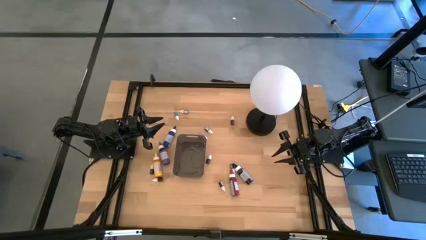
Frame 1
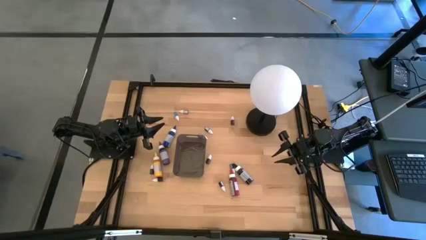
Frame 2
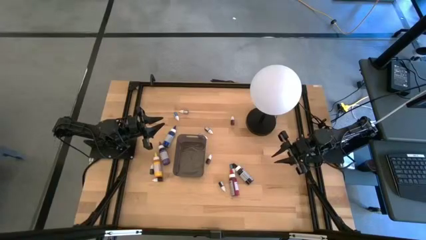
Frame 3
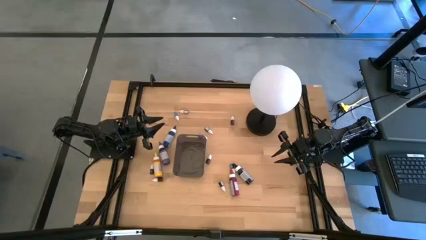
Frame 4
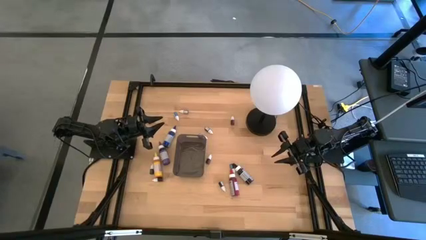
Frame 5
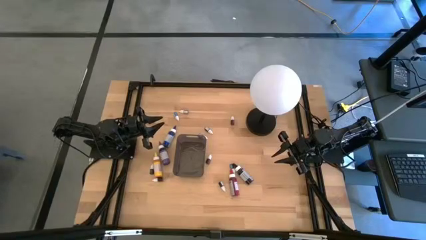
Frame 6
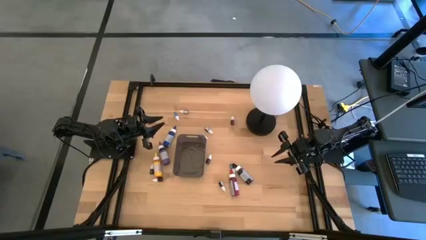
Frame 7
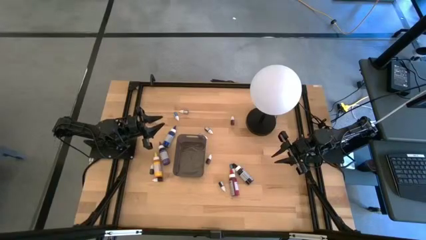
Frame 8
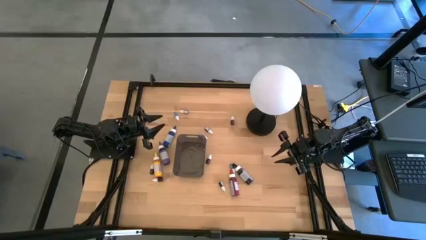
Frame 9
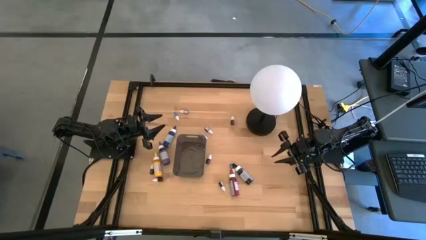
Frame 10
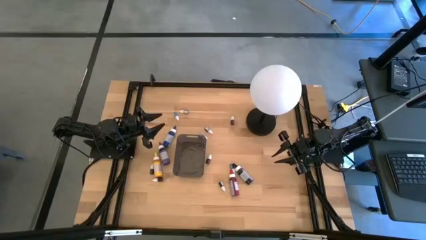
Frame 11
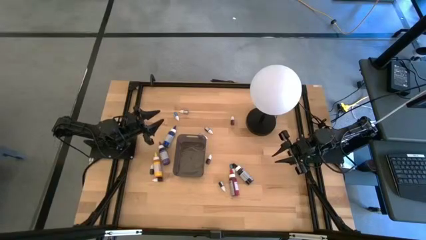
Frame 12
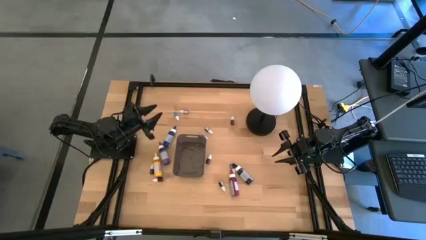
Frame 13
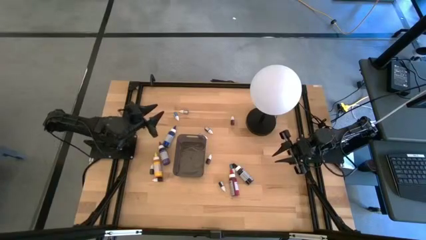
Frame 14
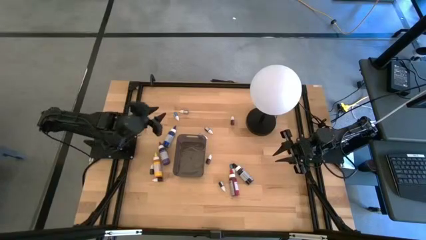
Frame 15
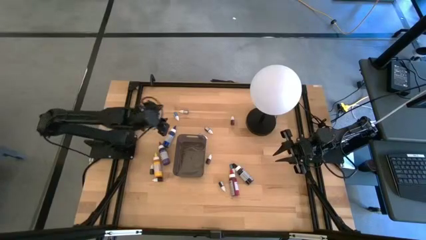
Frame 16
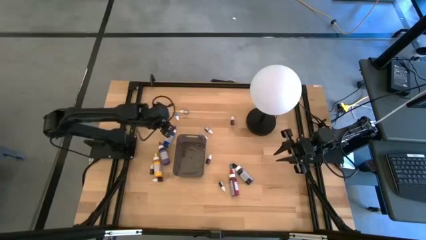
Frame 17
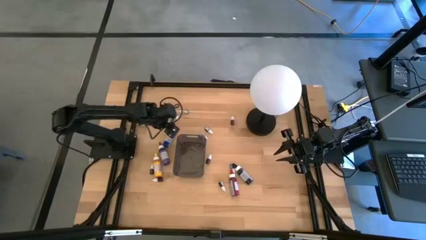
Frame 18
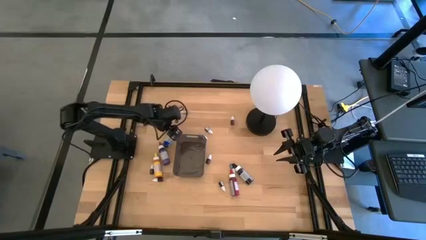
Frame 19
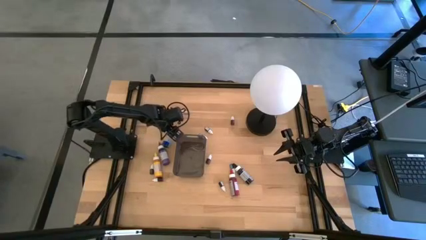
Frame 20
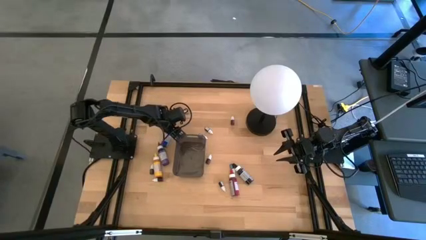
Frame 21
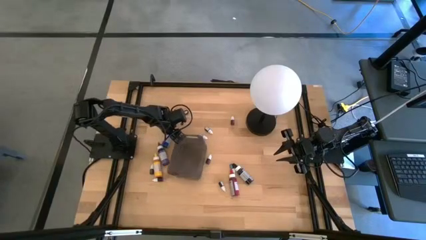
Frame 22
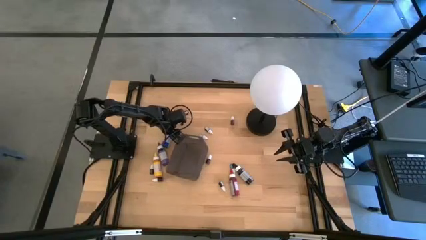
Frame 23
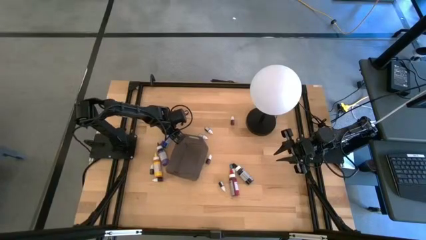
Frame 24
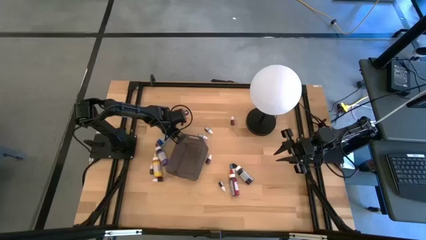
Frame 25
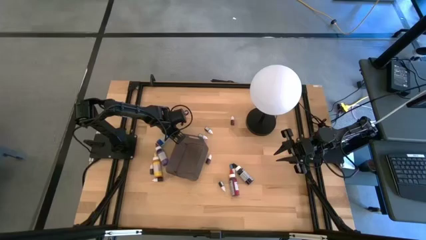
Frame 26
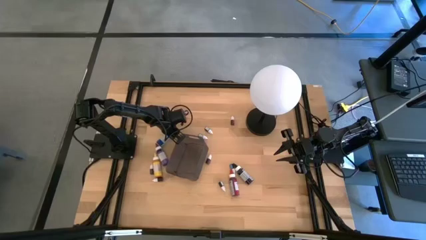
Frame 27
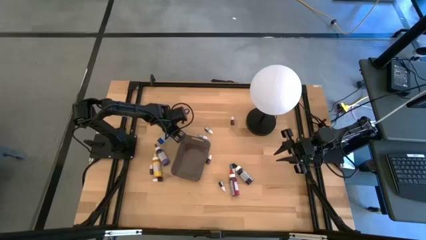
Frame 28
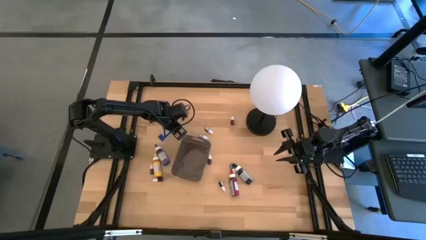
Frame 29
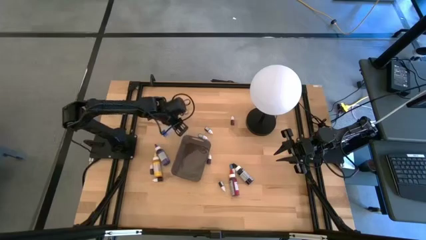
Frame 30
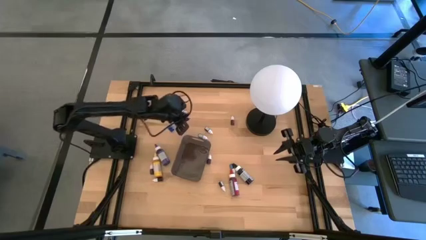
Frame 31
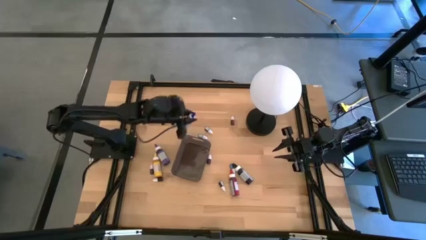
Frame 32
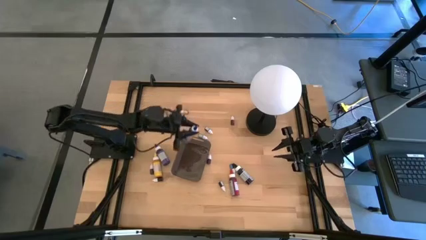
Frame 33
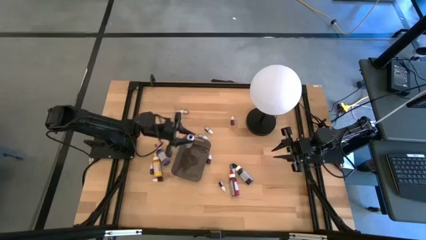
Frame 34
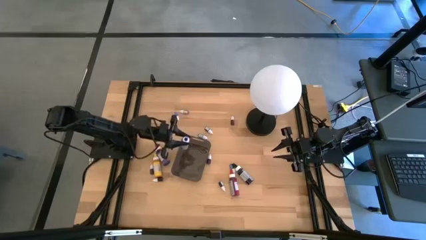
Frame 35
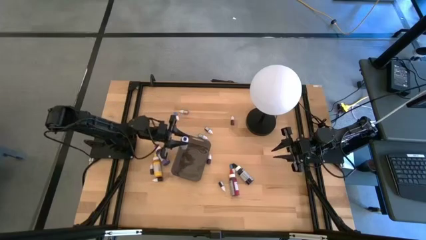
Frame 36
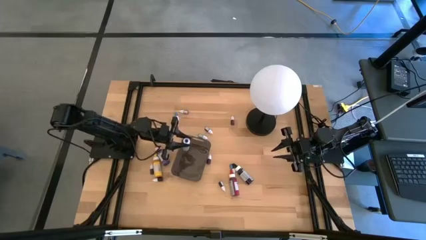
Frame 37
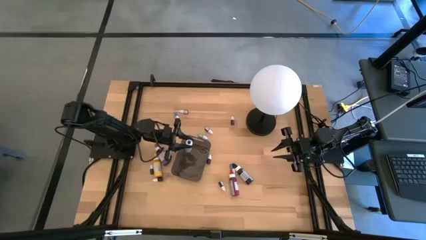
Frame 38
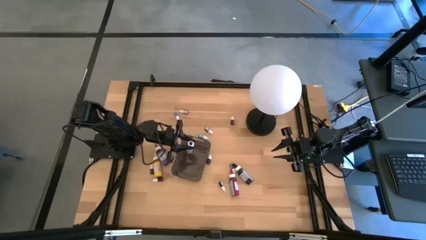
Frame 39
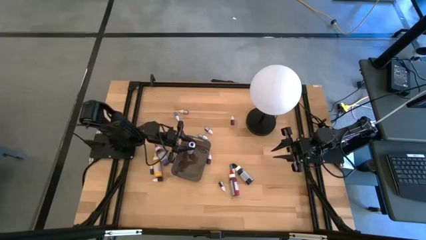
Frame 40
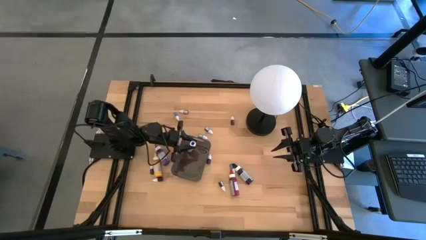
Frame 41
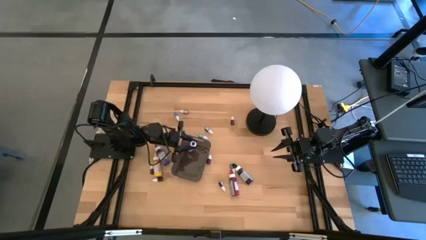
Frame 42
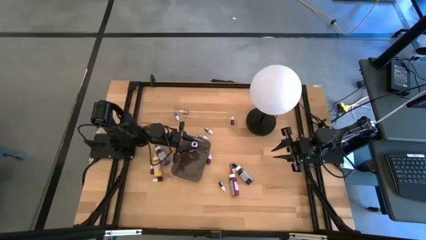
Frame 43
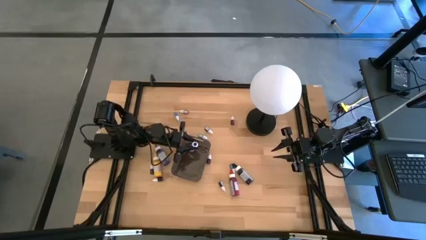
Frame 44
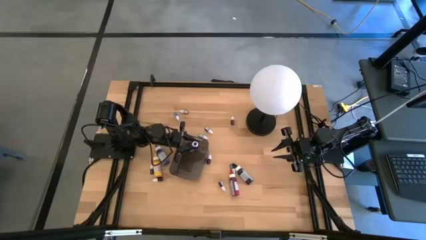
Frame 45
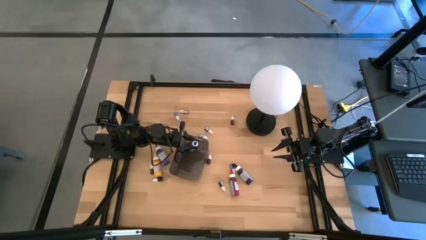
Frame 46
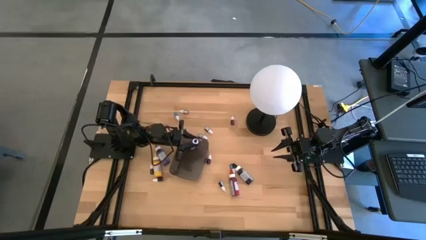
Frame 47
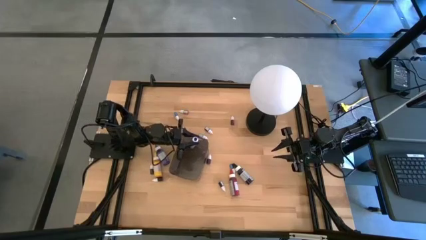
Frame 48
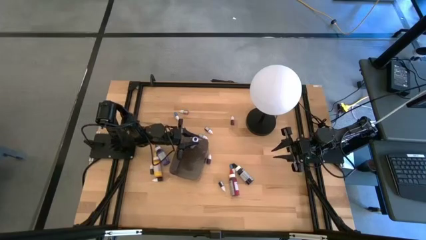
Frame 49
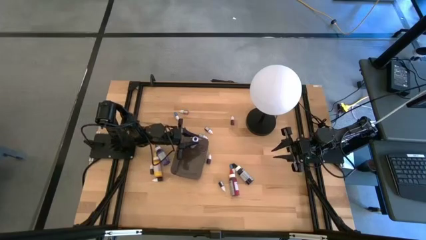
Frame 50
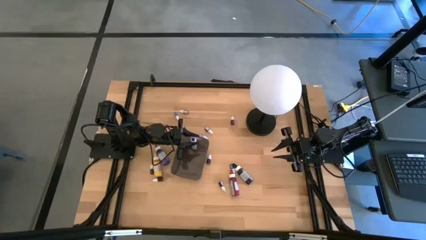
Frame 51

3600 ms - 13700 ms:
Task: Pick & Place food coloring
Put the large blue food coloring bottle into the black bin
